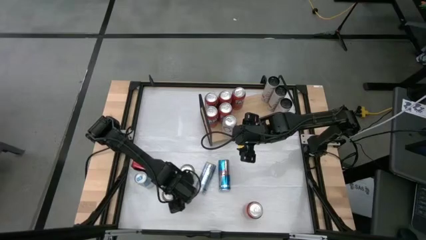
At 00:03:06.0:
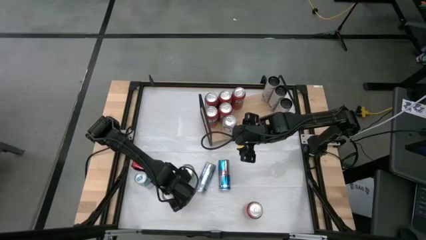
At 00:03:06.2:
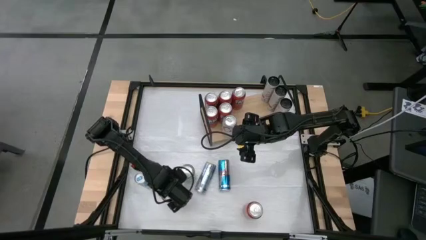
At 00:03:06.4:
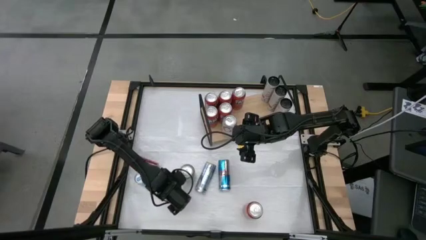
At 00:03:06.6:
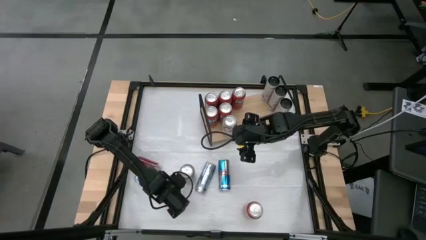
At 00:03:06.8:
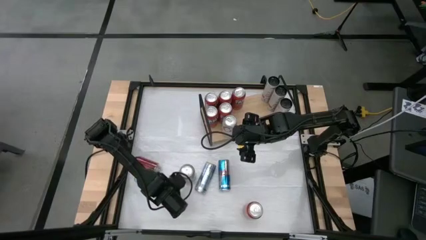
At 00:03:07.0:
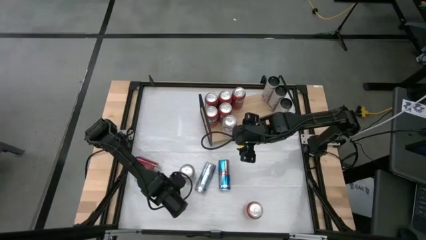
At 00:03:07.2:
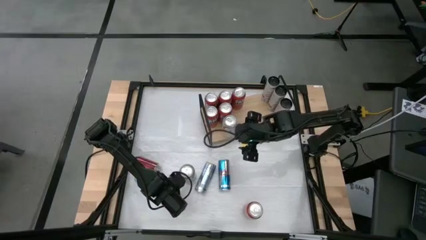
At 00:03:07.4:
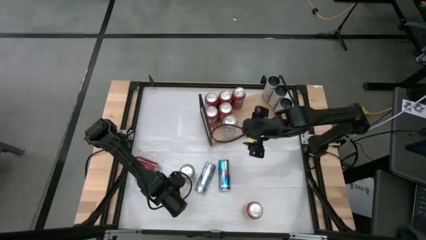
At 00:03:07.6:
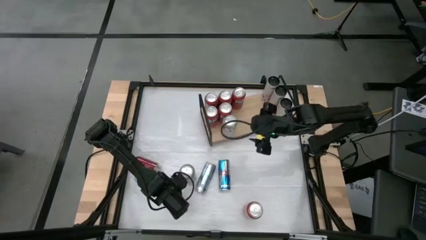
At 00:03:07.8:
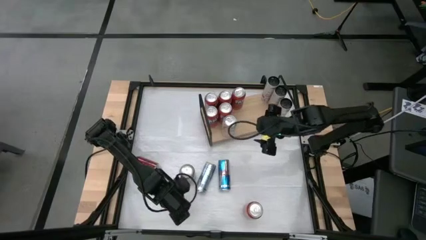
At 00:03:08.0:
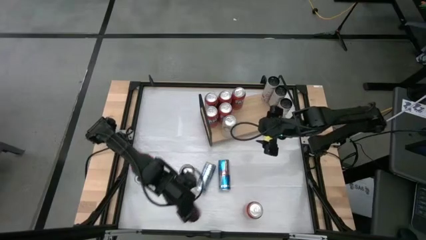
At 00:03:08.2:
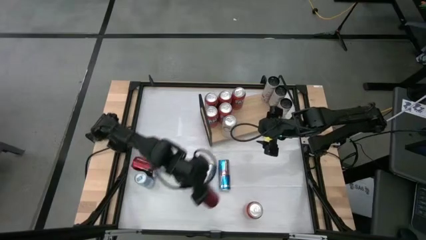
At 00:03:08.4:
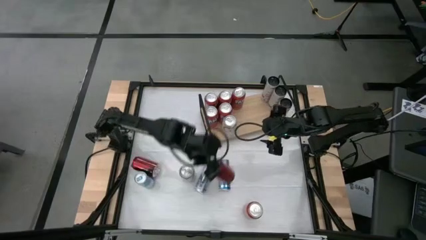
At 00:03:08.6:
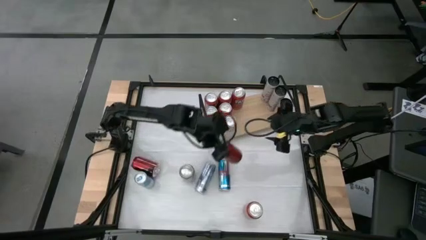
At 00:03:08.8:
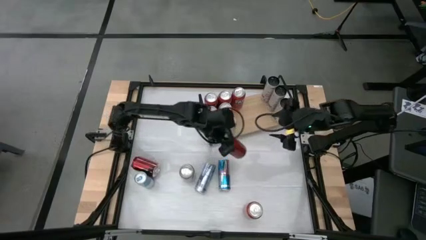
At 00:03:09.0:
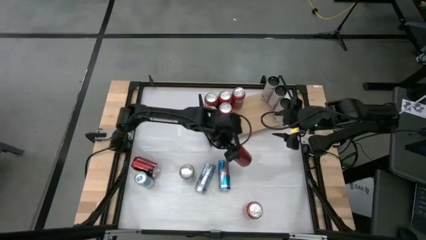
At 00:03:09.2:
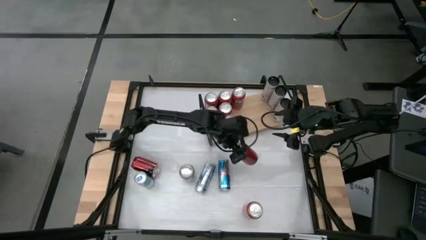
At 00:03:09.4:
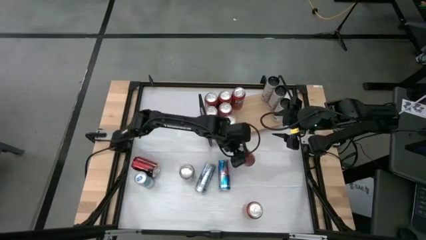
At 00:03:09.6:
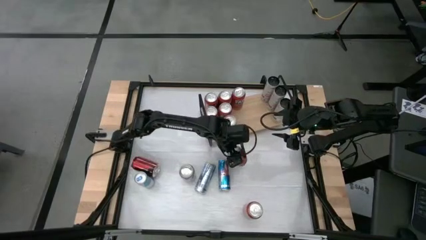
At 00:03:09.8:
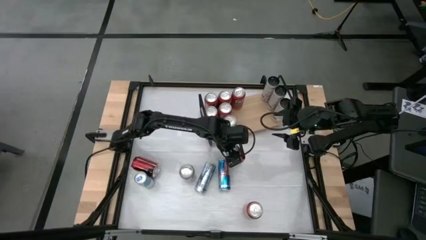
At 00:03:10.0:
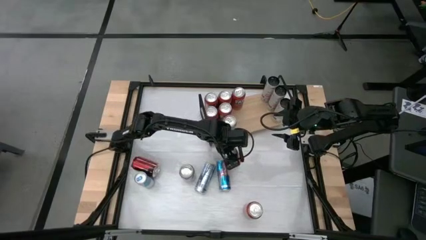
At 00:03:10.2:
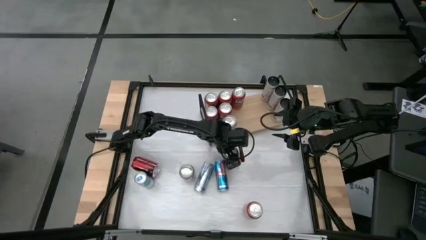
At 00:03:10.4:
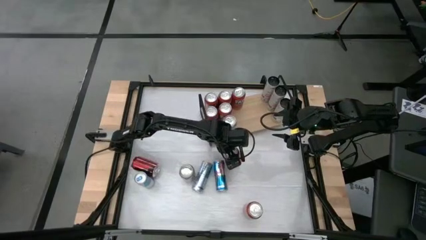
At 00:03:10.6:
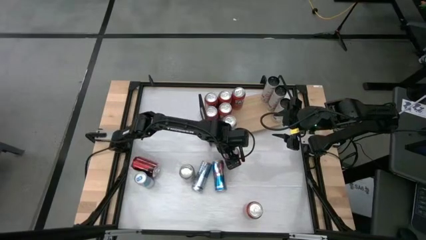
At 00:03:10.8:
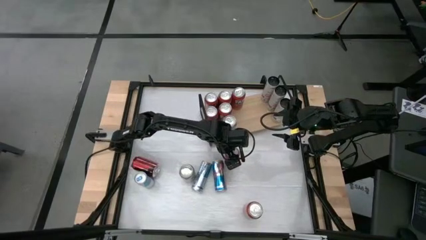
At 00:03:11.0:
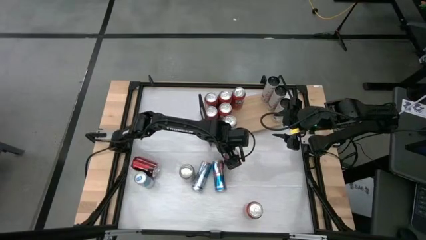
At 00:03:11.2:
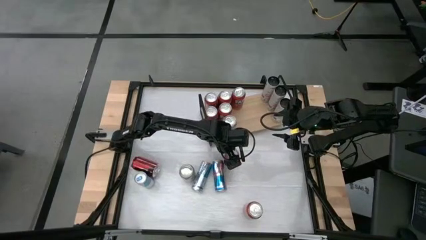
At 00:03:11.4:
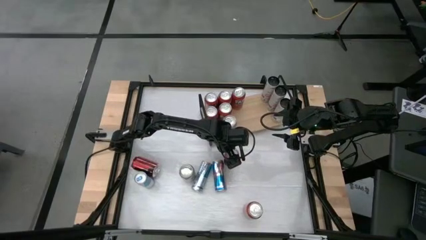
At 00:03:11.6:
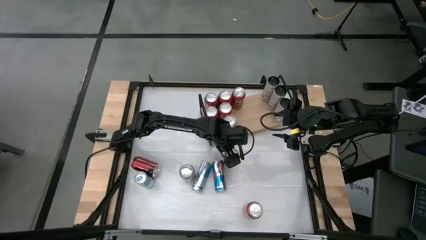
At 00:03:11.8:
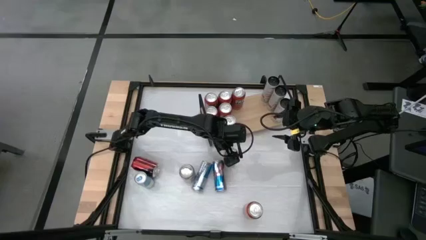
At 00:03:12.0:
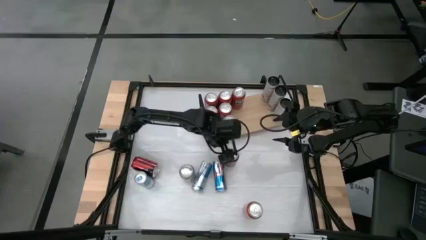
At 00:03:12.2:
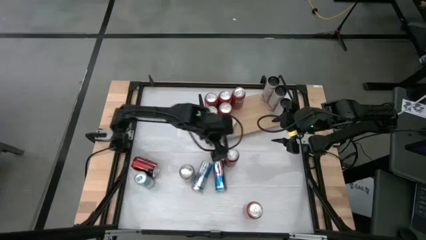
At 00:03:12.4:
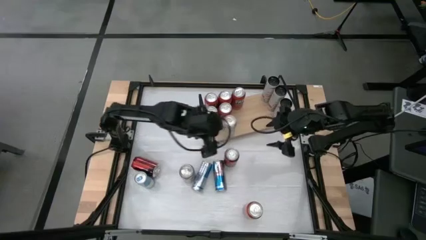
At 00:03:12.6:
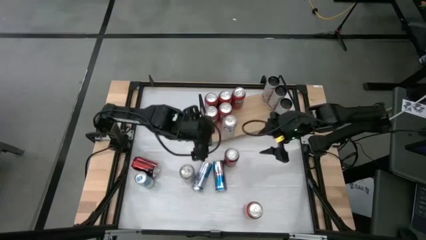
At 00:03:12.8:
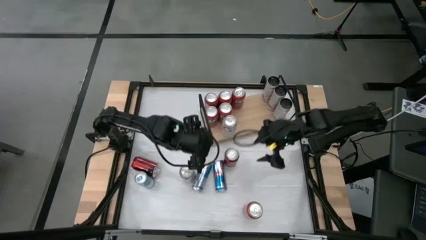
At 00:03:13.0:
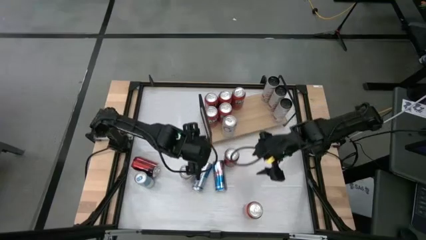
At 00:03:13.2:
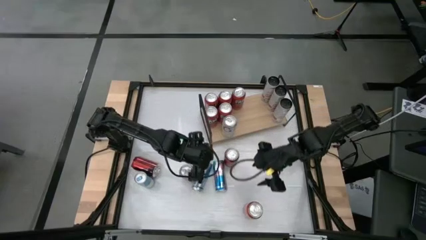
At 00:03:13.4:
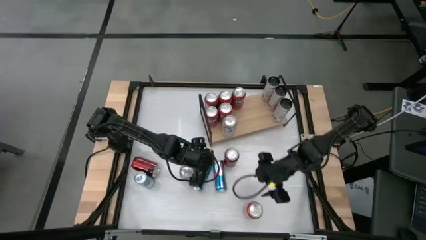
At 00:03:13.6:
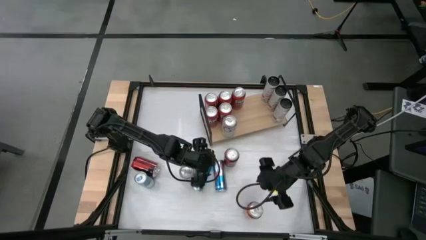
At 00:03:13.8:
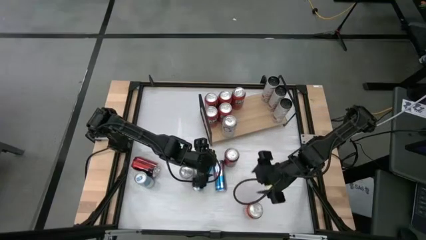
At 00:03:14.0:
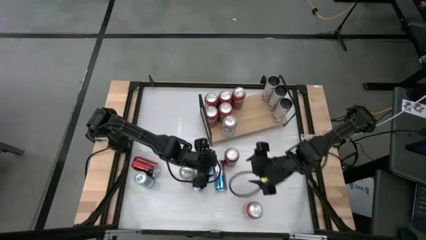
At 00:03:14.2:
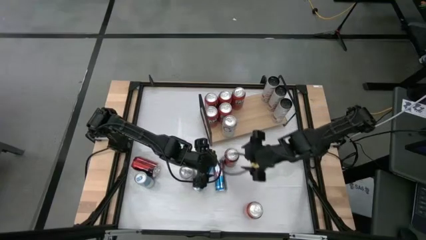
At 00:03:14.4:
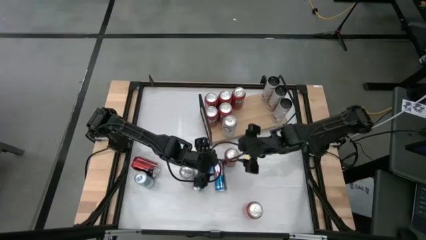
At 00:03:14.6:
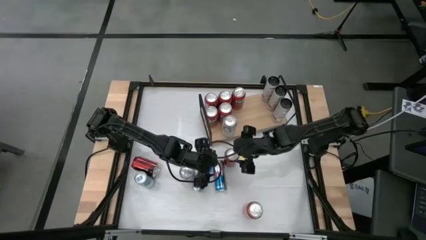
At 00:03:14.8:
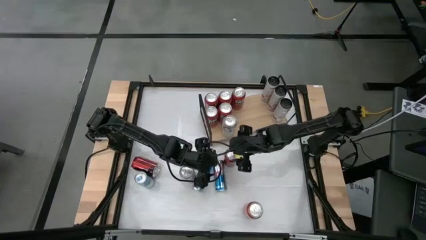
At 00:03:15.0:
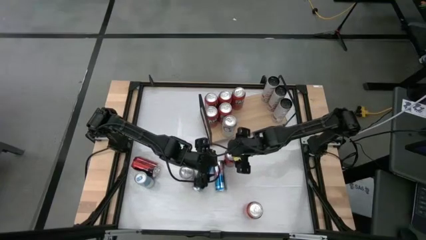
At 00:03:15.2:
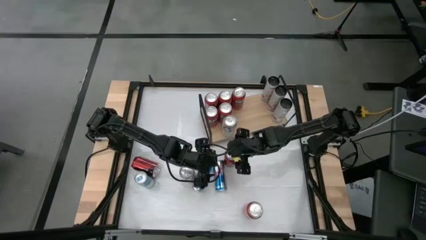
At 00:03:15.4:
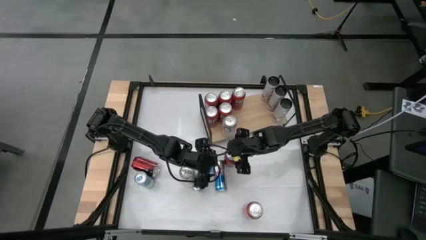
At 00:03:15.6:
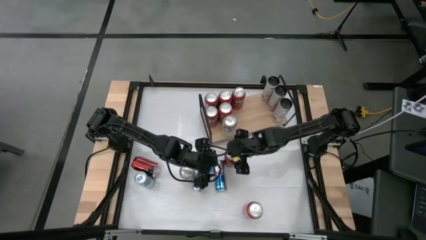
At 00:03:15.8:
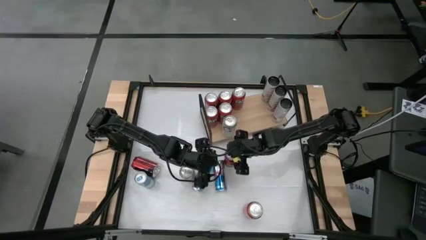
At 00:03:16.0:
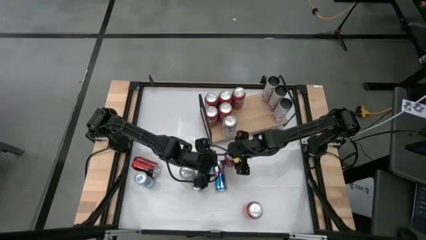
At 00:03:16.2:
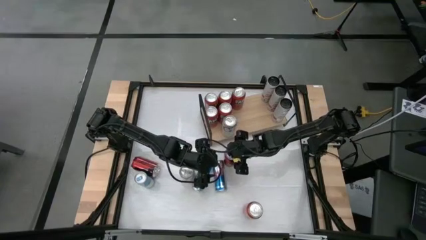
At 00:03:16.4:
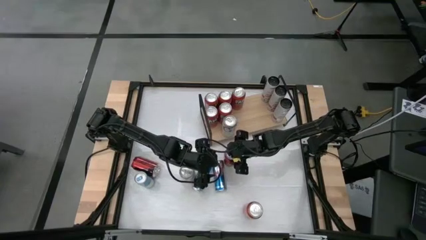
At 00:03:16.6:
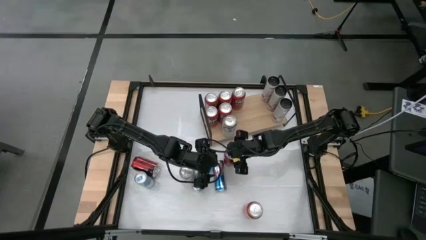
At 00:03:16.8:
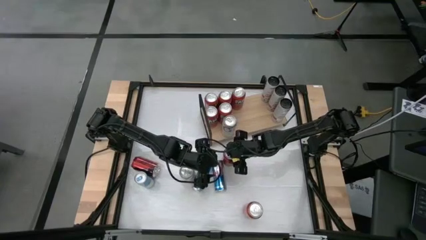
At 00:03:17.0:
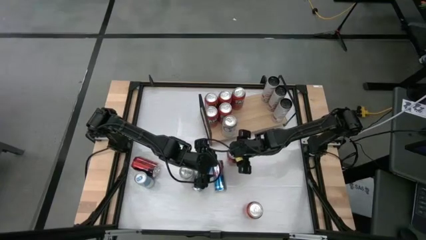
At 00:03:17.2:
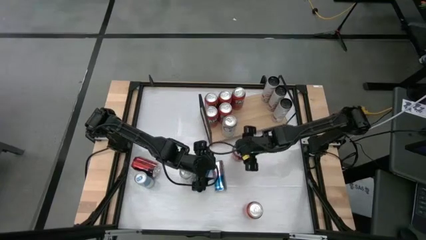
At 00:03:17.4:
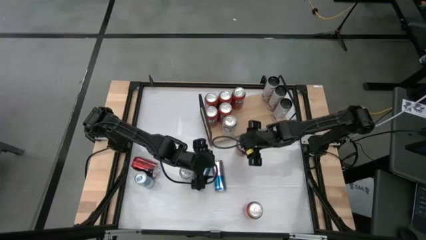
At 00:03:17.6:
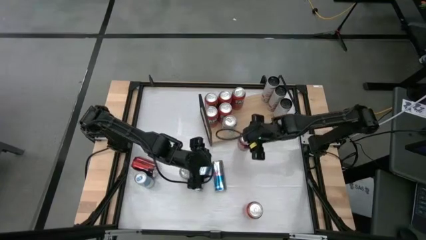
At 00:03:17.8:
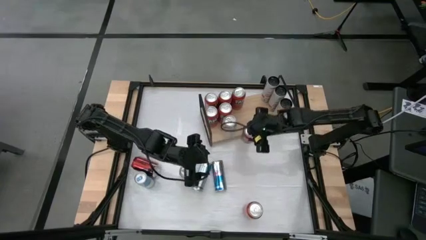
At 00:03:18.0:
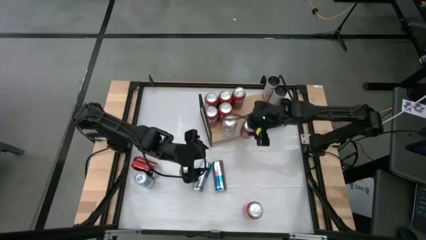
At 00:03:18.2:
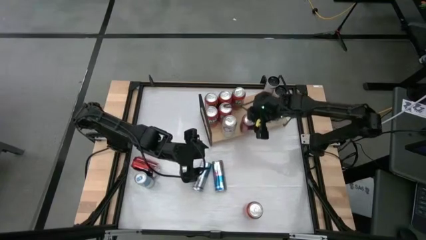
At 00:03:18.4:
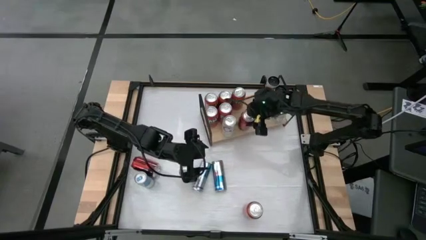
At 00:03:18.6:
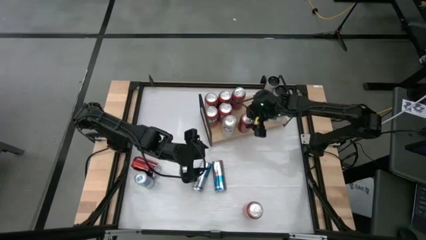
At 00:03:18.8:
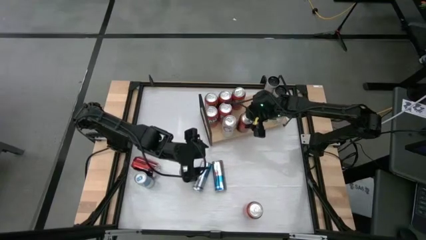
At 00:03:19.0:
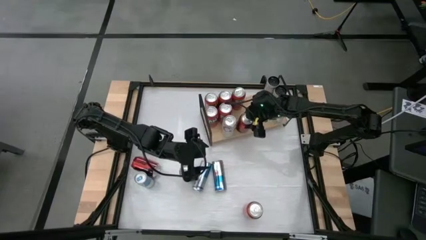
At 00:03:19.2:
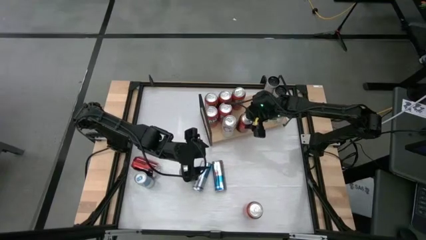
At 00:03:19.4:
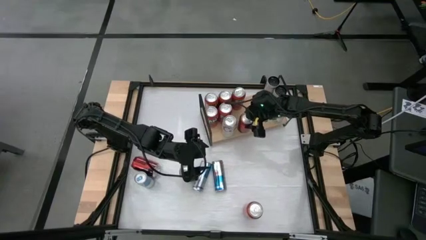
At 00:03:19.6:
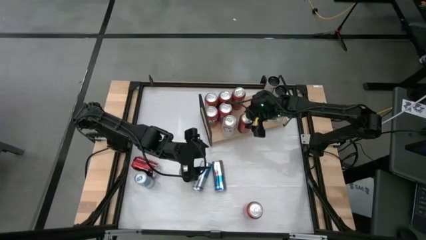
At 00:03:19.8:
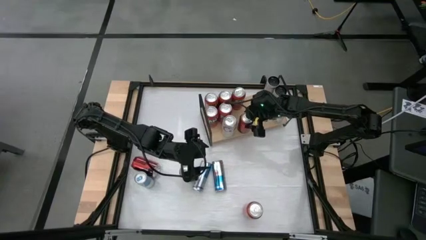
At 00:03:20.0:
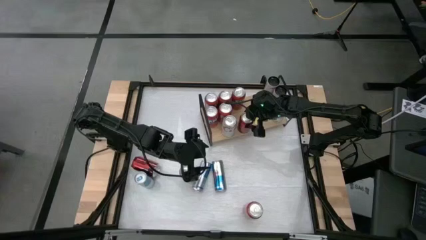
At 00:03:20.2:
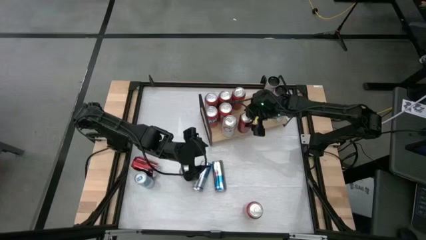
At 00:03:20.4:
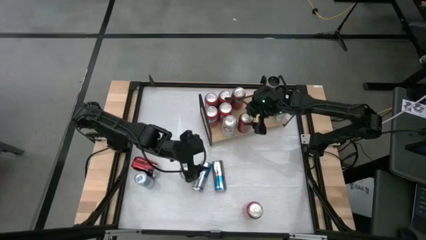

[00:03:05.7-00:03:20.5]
Task: Place canned beverage on shelf
Put the center red soda can on the shelf
